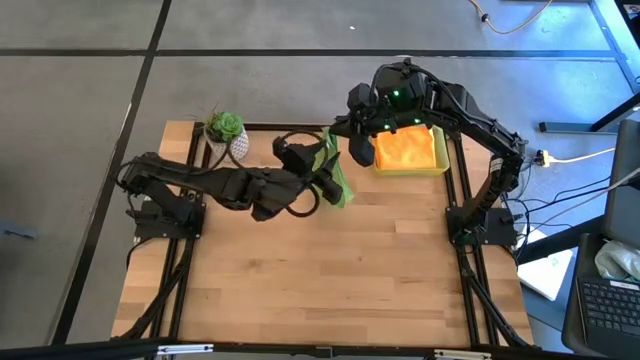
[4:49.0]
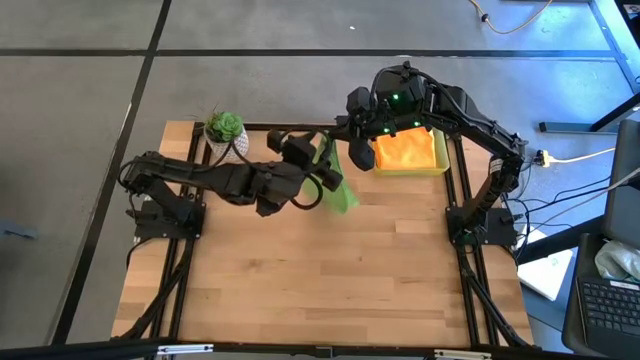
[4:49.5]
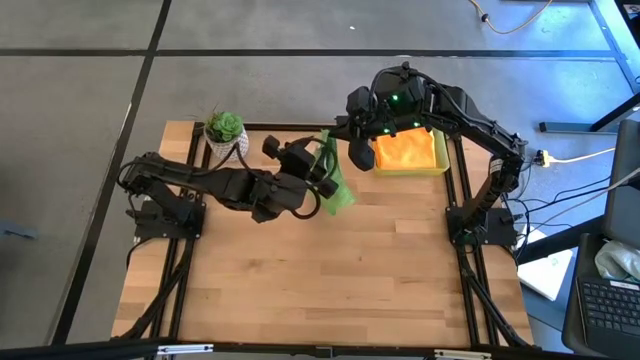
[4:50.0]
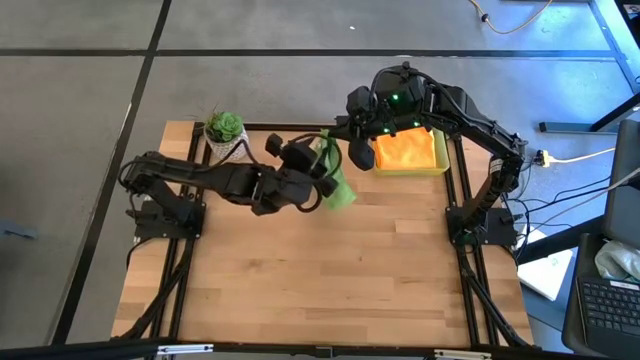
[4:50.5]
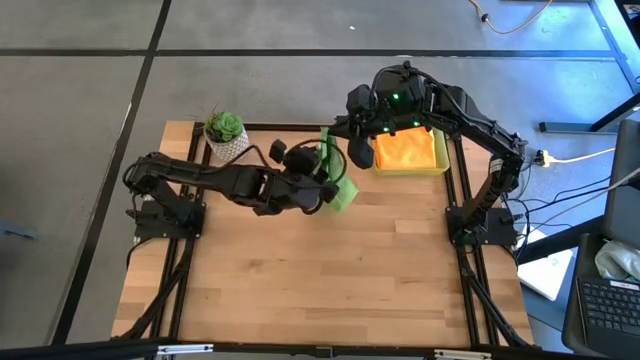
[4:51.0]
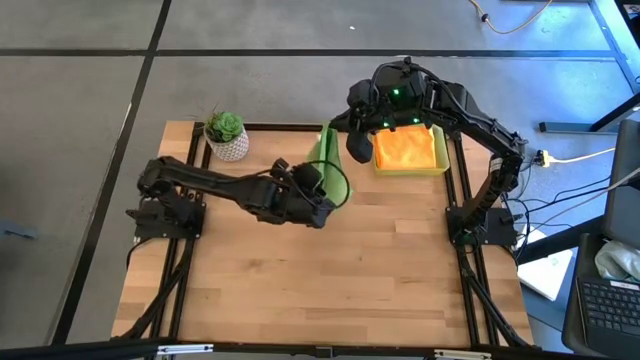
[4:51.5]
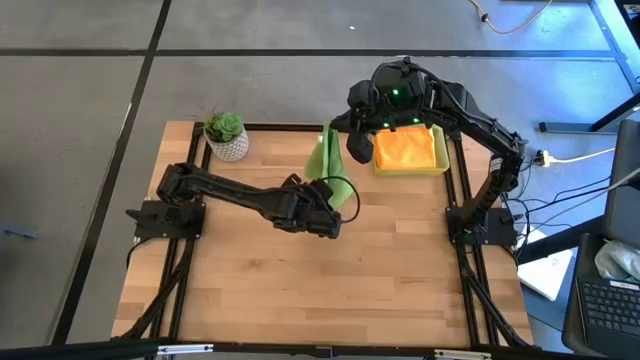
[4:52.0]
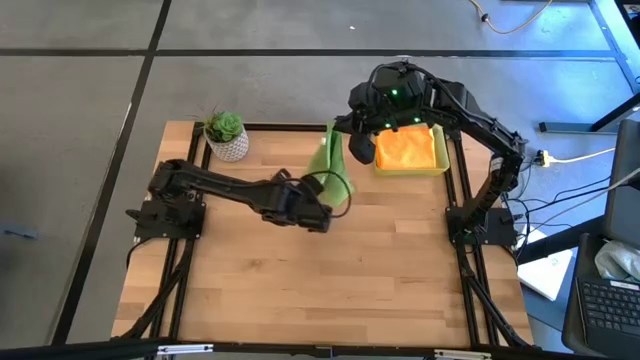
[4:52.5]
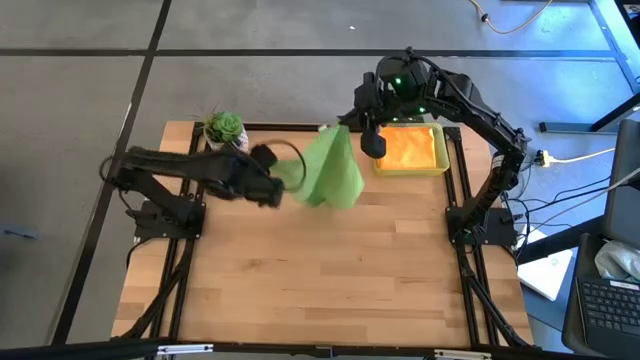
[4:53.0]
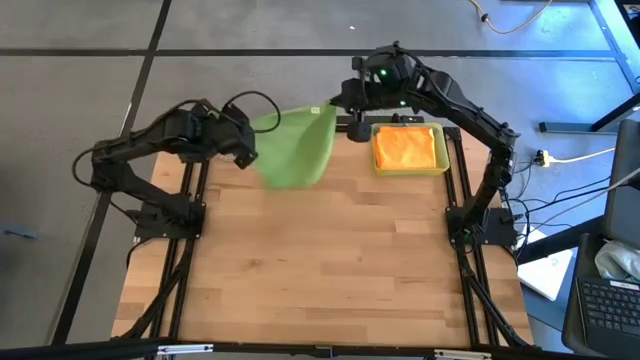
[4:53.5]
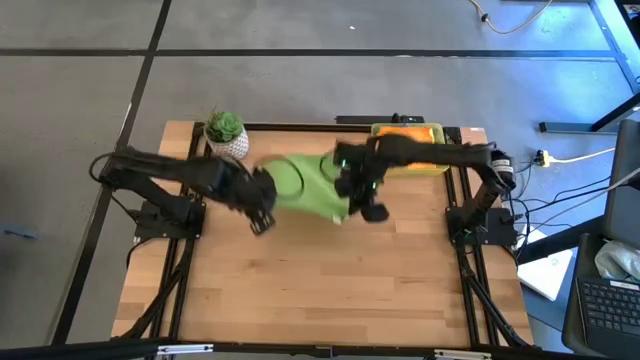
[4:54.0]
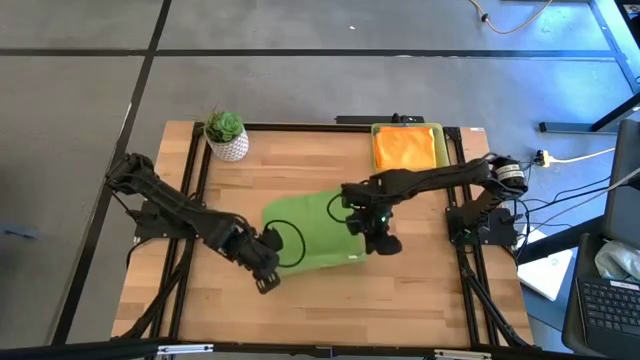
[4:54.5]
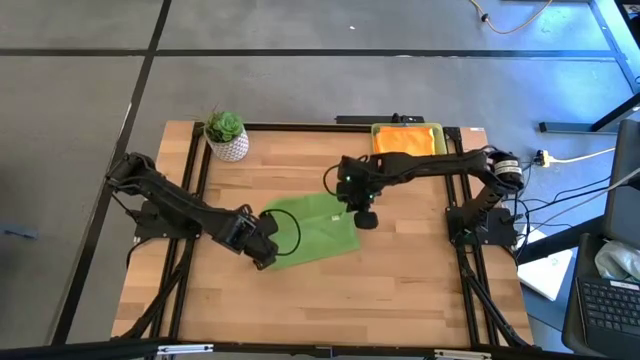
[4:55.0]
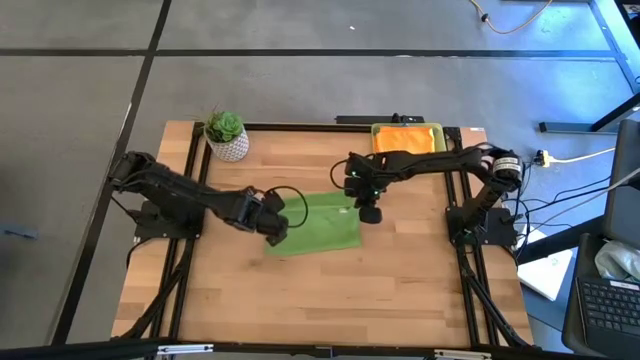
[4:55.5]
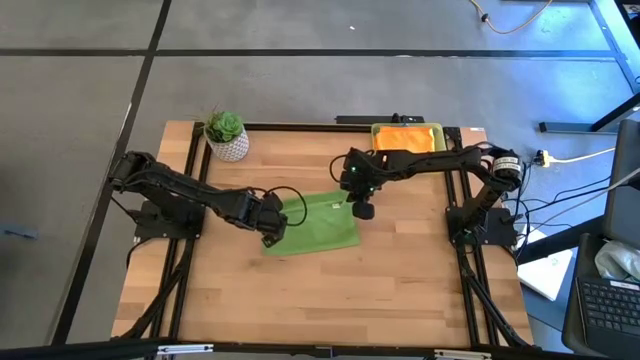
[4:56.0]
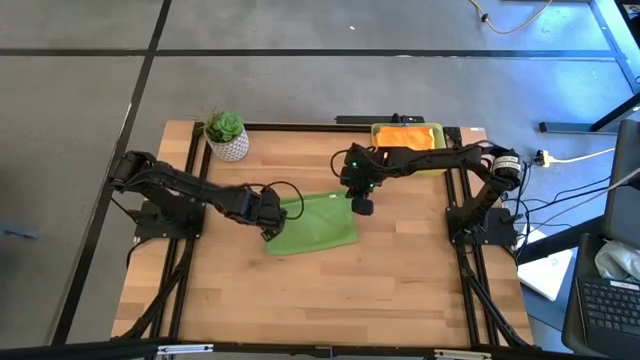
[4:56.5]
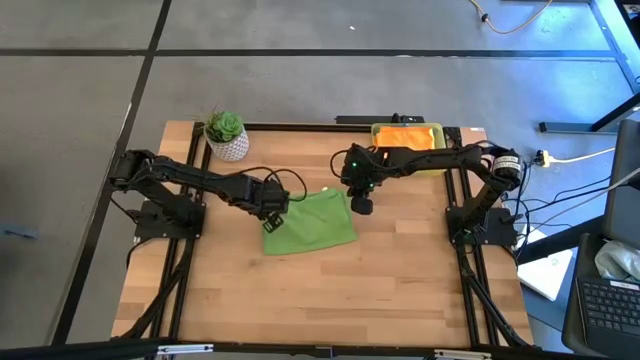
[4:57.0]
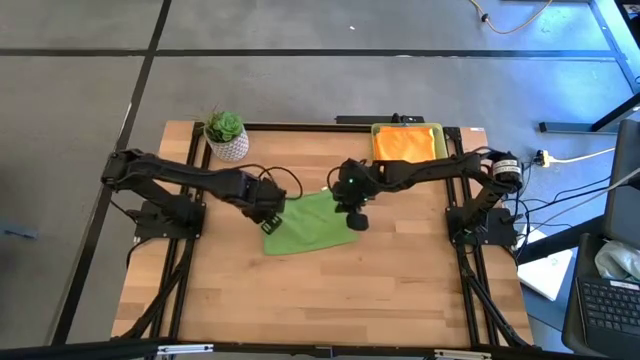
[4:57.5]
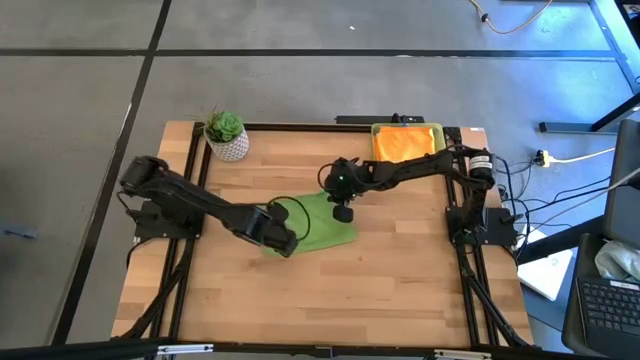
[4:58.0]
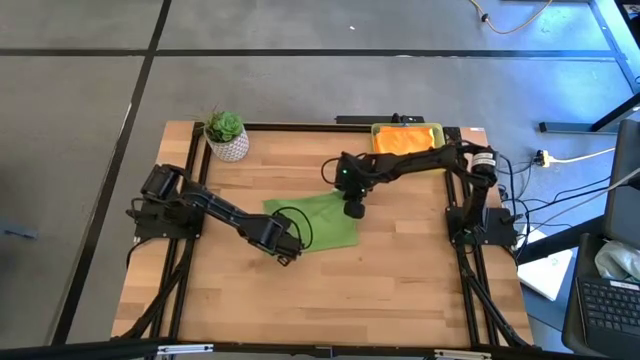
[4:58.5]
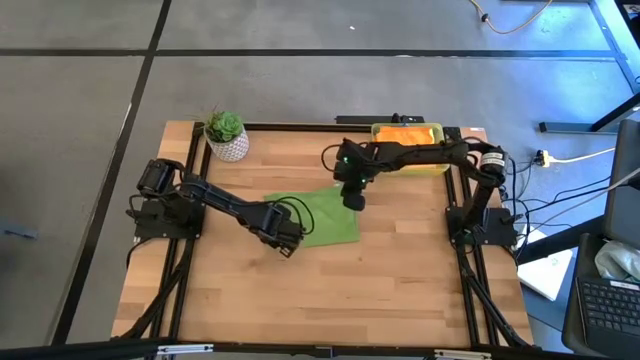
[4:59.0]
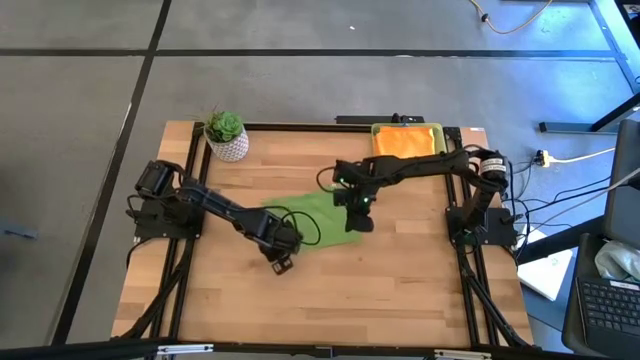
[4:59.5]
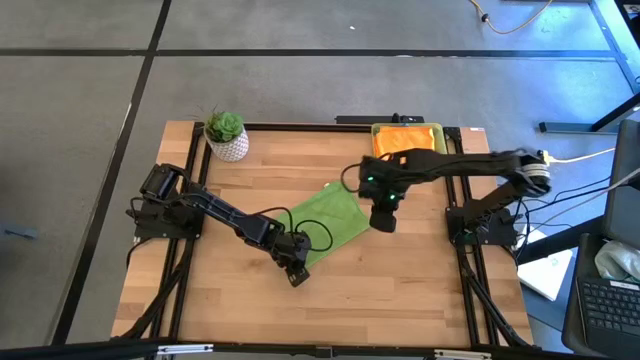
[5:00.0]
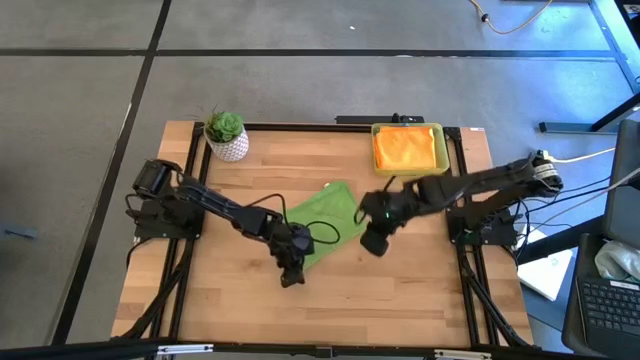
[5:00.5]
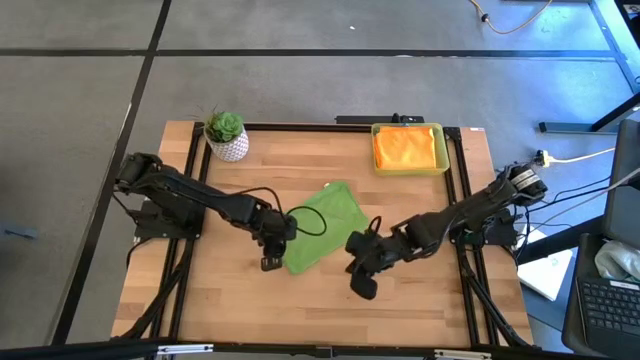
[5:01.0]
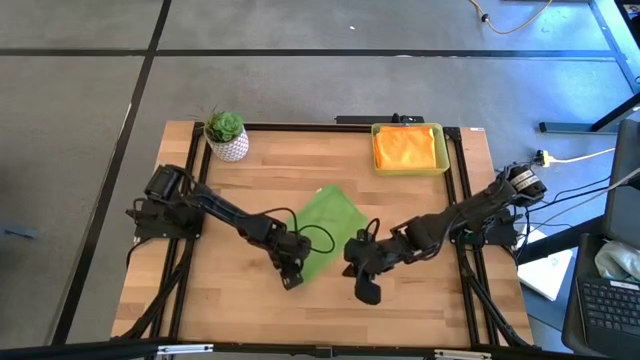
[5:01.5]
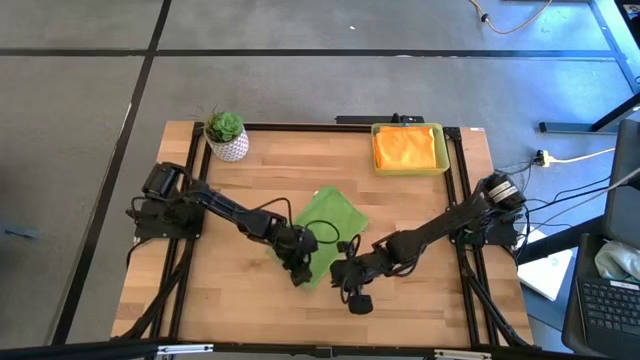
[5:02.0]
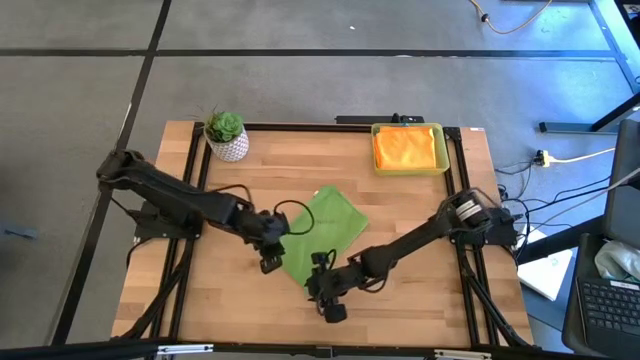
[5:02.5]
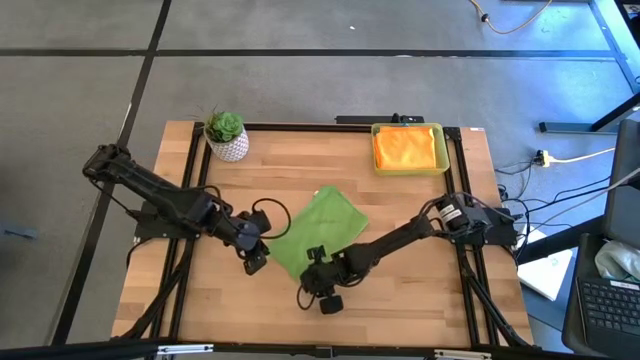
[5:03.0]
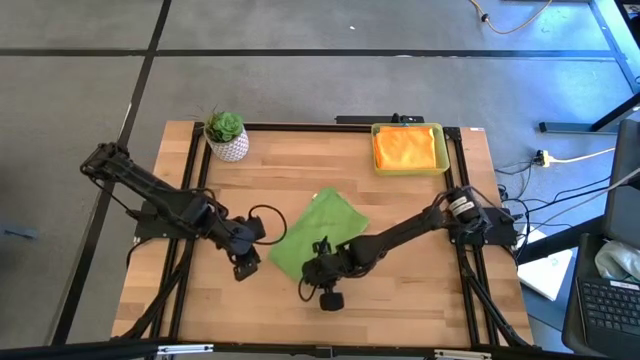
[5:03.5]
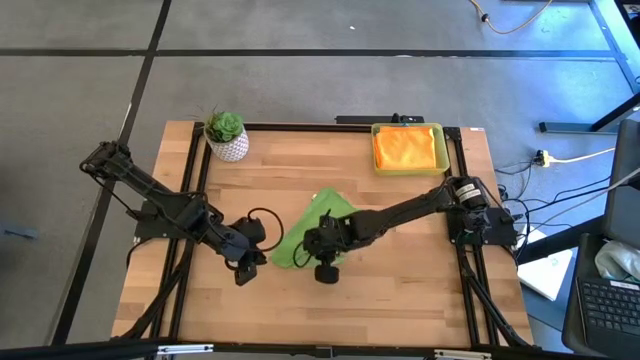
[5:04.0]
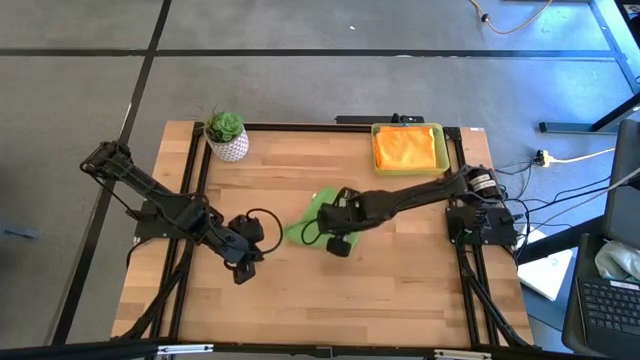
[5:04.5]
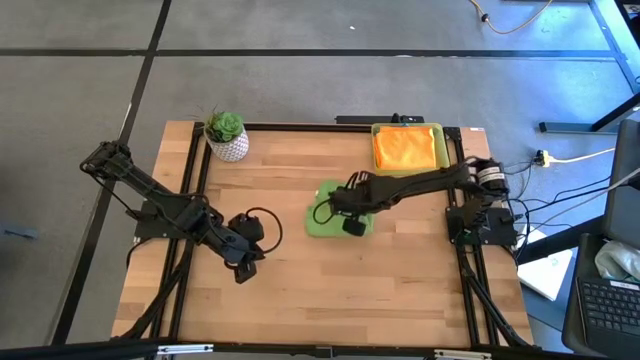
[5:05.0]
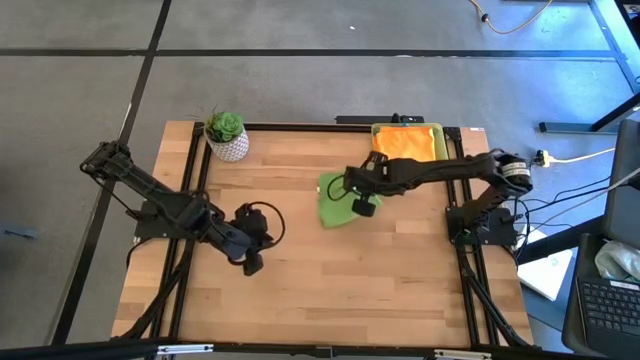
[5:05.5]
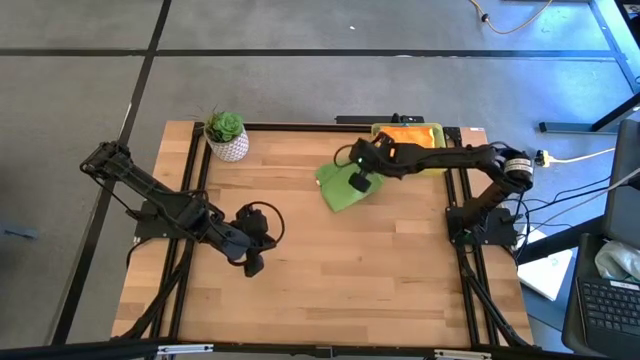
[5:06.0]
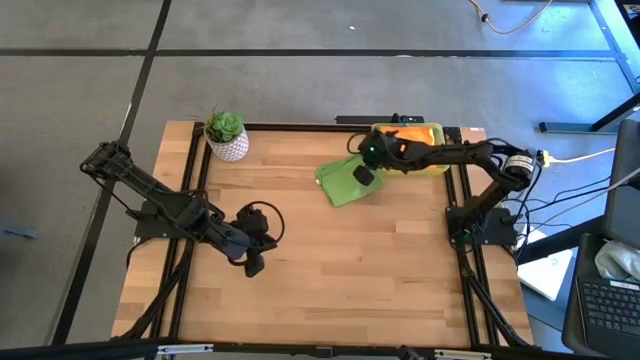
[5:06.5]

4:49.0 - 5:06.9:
Task: Fold microfiber towels
Fold the green microfiber towel

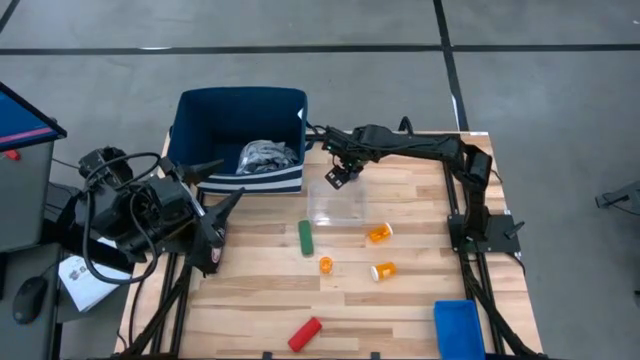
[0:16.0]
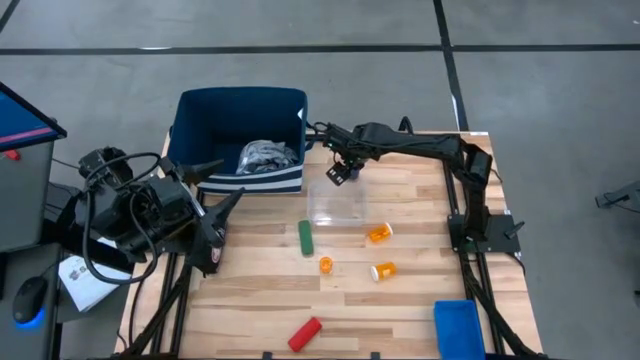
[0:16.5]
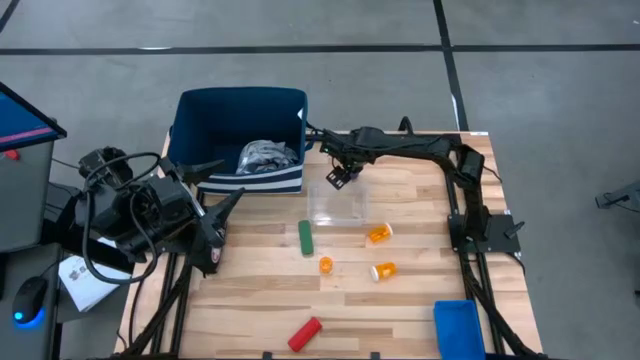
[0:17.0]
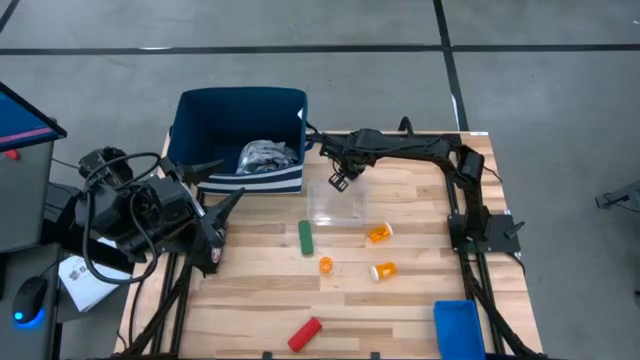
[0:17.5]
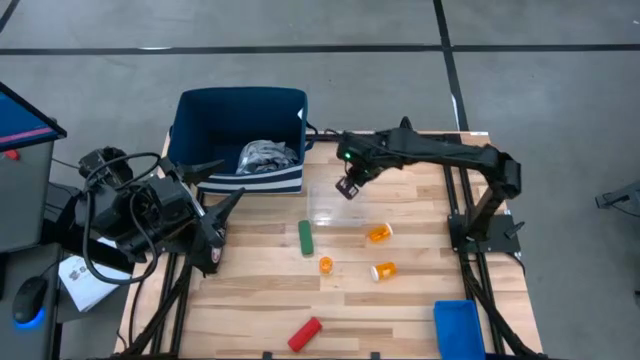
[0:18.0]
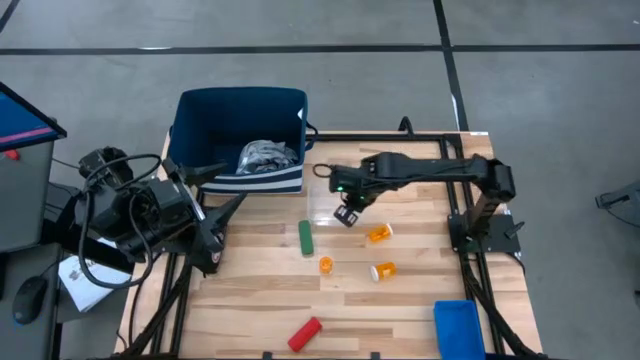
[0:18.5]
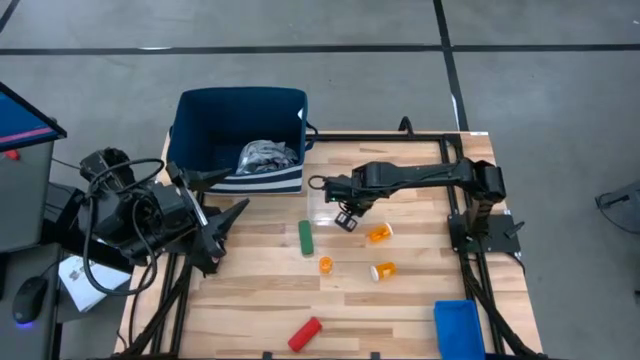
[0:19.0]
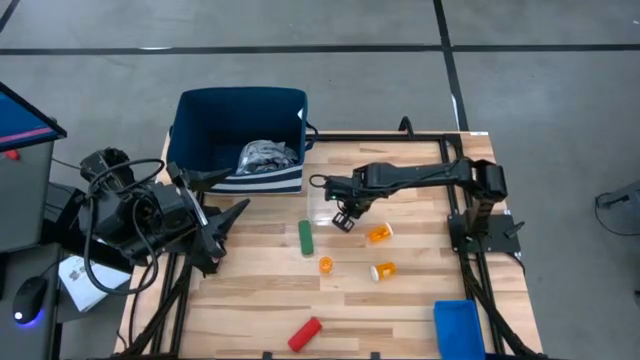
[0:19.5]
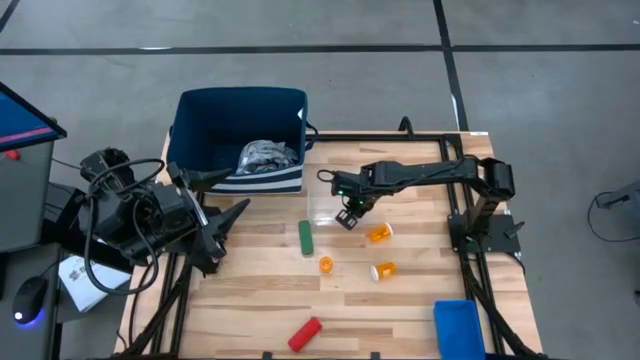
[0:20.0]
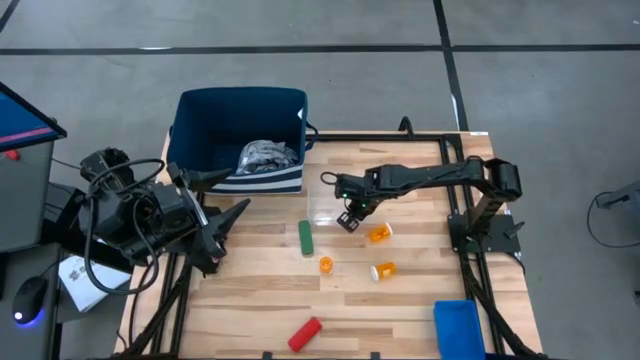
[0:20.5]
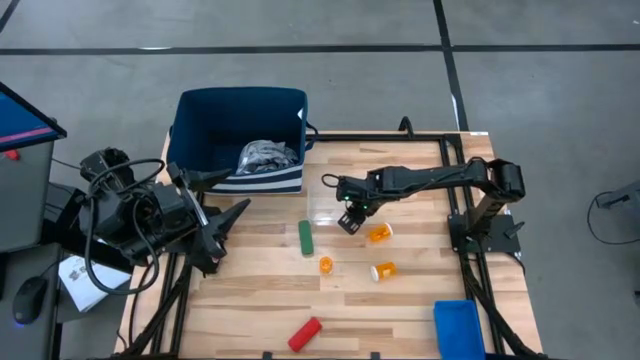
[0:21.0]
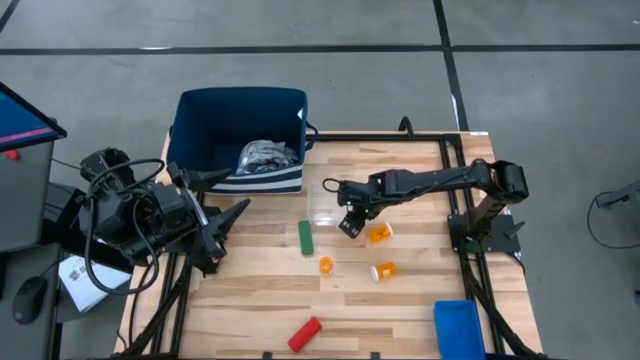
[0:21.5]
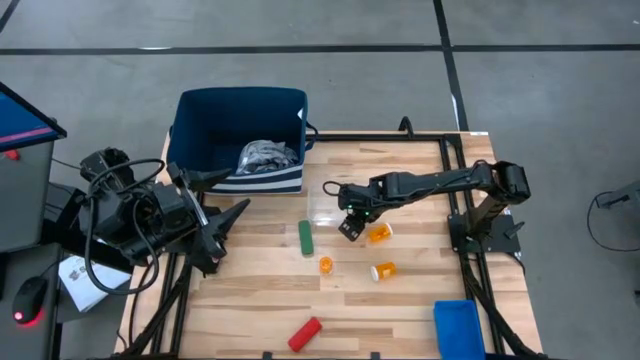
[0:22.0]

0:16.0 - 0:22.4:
Task: Pick & place medical supplies in basket/bin
Put the blue bandage into the transparent bin
